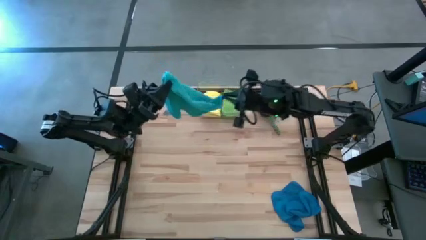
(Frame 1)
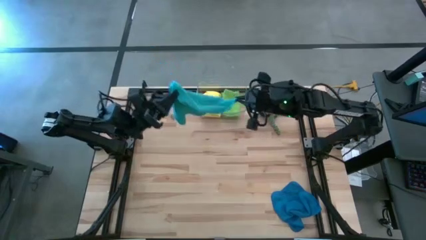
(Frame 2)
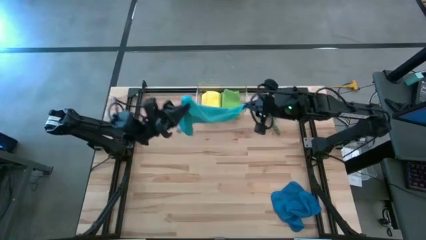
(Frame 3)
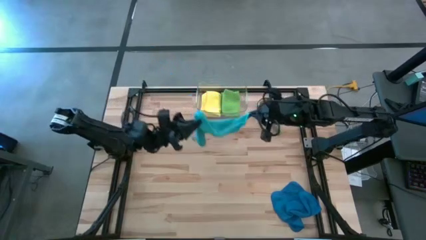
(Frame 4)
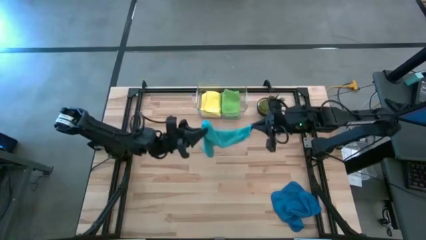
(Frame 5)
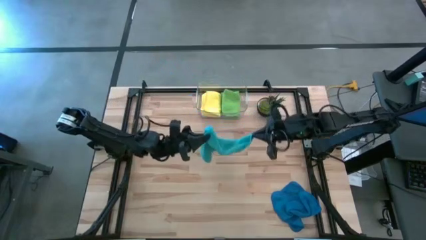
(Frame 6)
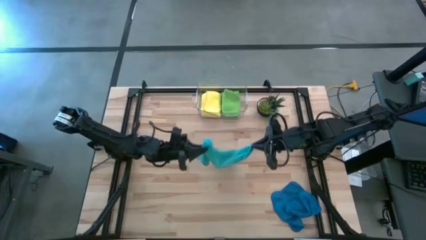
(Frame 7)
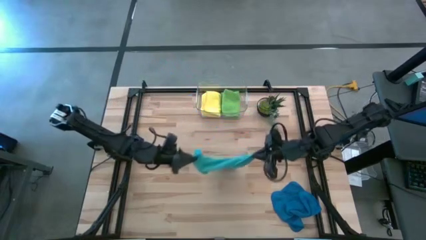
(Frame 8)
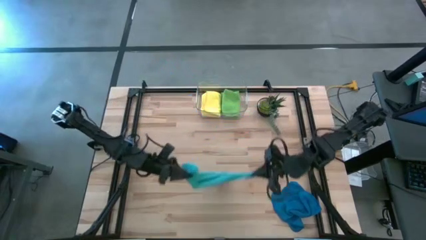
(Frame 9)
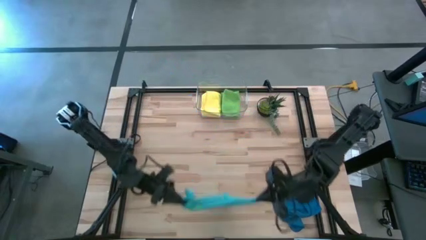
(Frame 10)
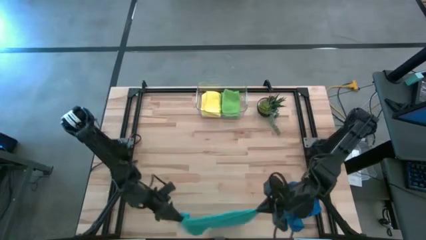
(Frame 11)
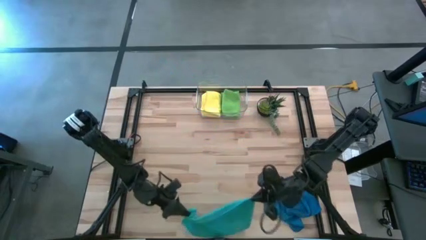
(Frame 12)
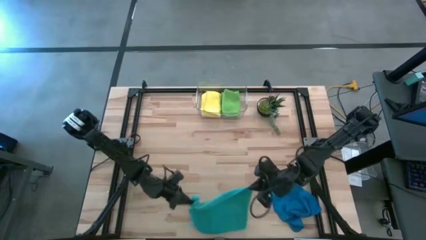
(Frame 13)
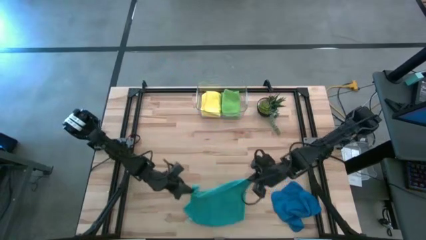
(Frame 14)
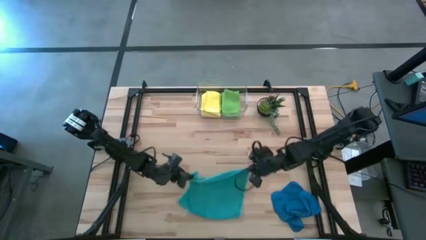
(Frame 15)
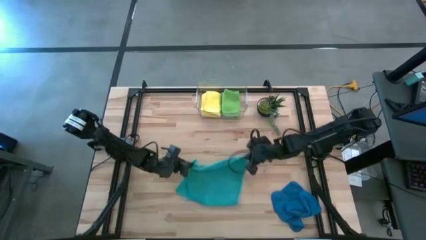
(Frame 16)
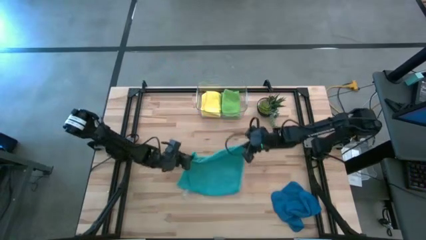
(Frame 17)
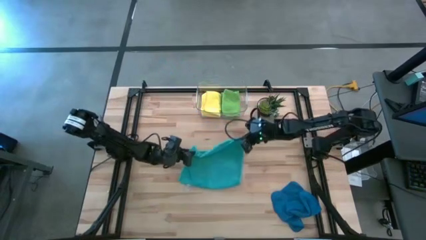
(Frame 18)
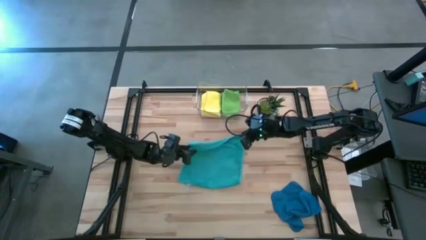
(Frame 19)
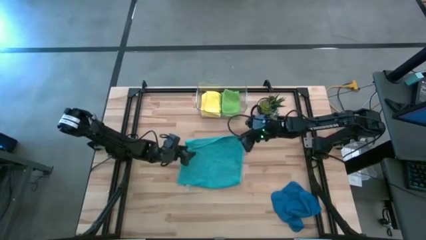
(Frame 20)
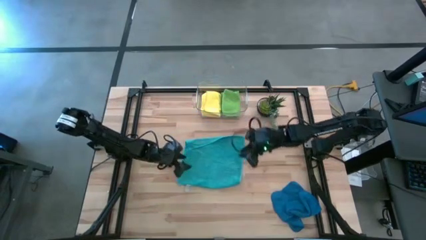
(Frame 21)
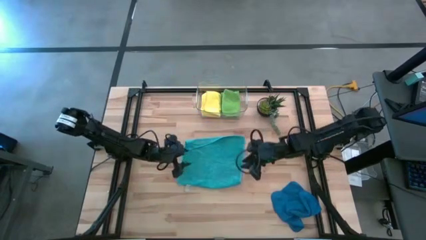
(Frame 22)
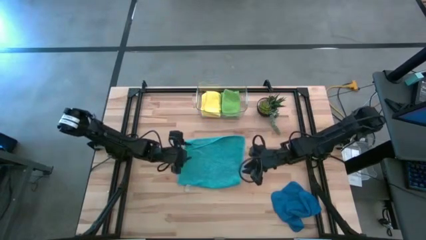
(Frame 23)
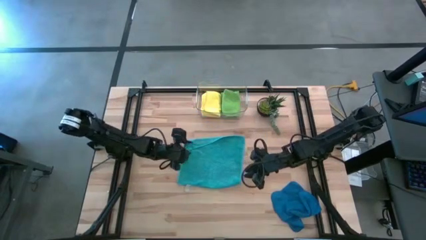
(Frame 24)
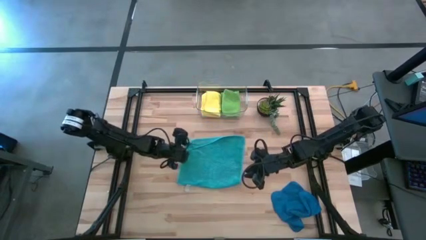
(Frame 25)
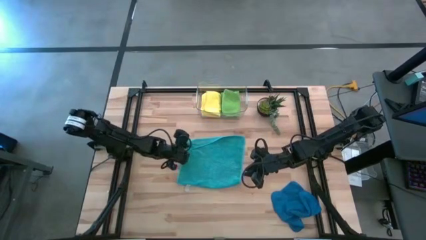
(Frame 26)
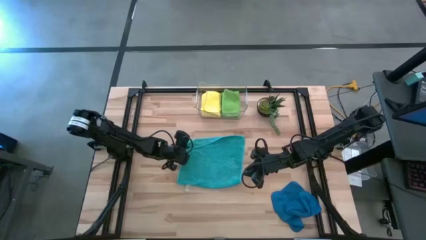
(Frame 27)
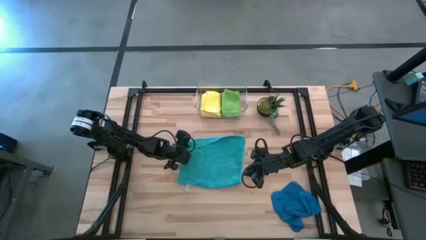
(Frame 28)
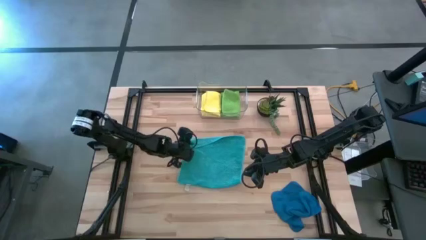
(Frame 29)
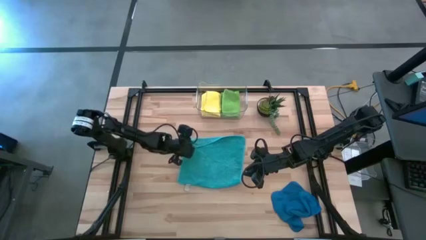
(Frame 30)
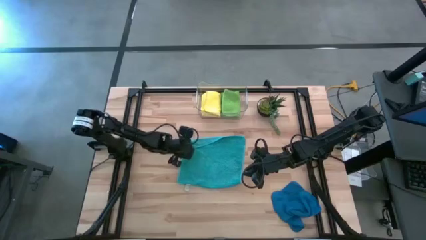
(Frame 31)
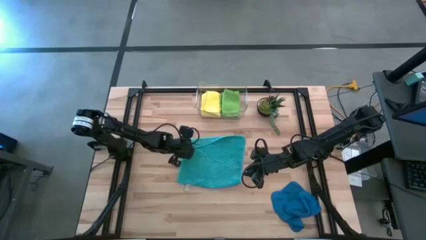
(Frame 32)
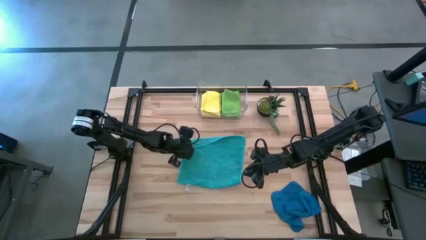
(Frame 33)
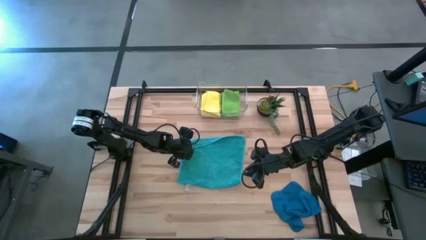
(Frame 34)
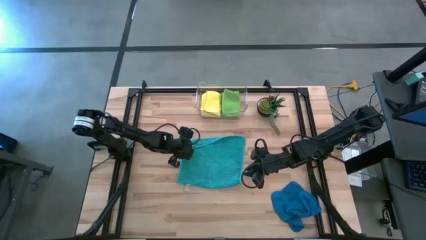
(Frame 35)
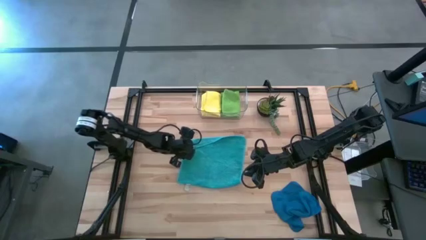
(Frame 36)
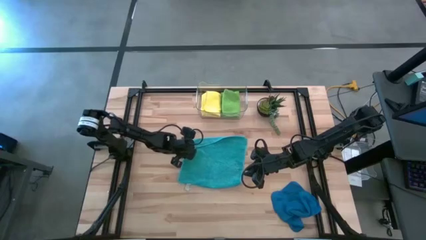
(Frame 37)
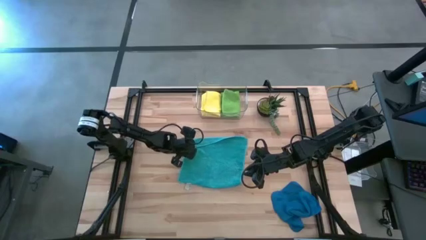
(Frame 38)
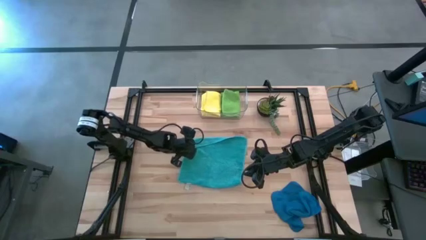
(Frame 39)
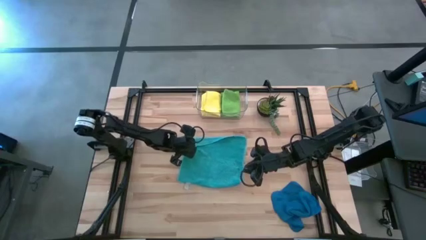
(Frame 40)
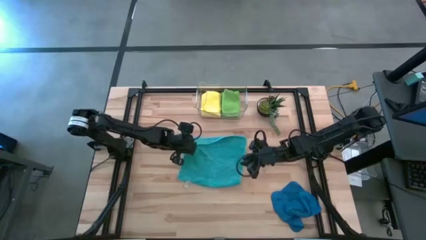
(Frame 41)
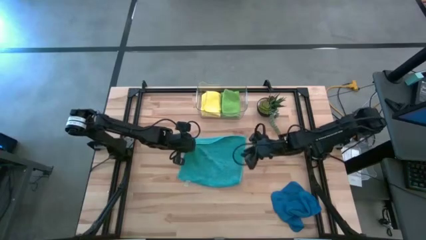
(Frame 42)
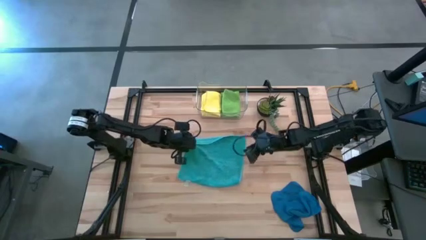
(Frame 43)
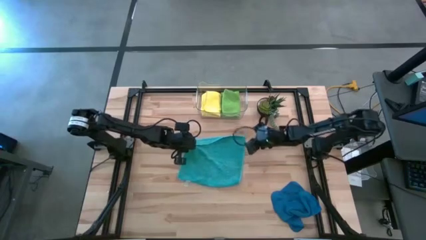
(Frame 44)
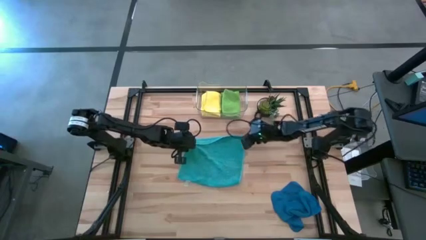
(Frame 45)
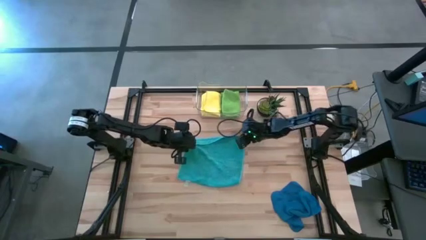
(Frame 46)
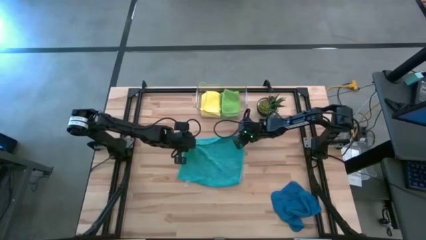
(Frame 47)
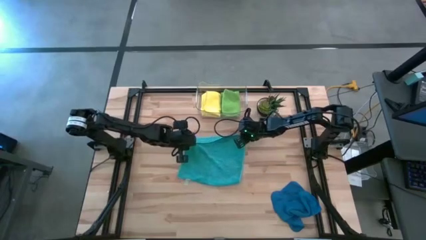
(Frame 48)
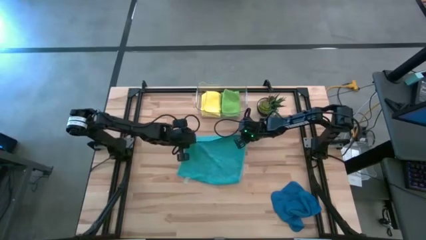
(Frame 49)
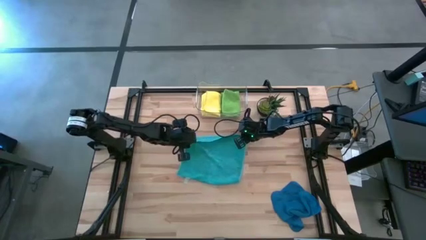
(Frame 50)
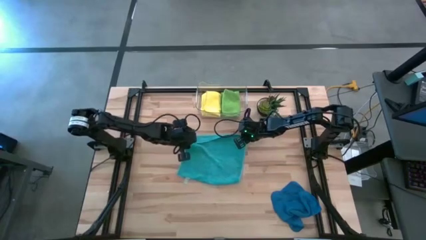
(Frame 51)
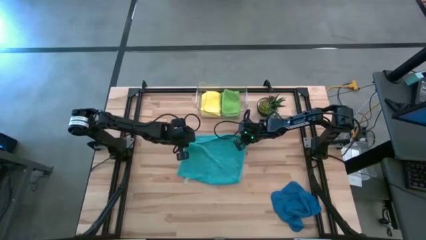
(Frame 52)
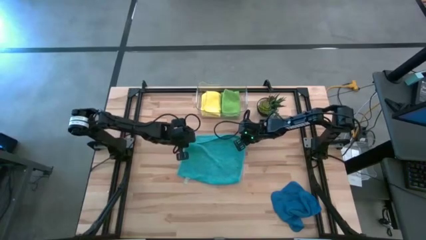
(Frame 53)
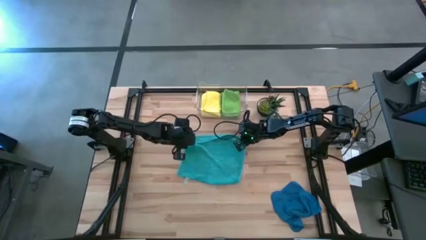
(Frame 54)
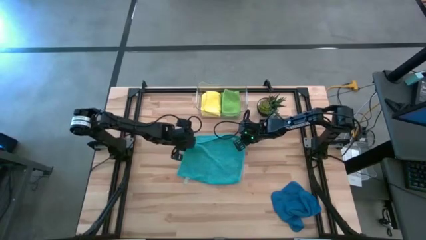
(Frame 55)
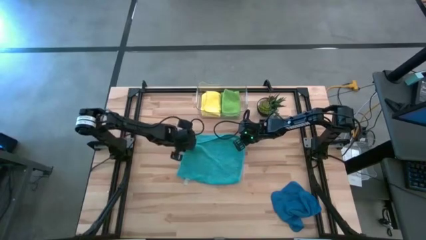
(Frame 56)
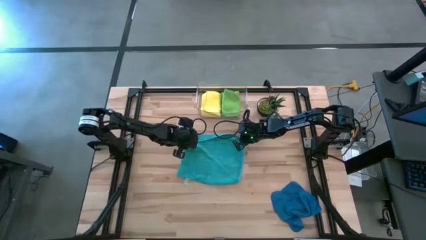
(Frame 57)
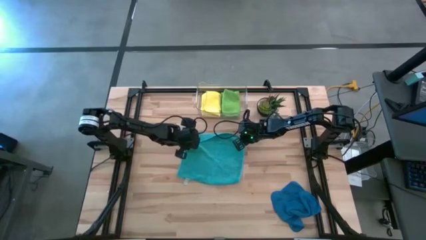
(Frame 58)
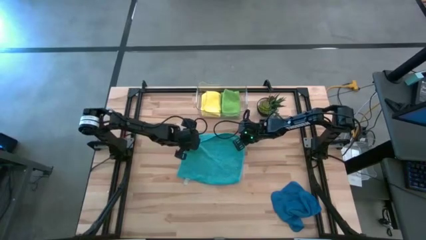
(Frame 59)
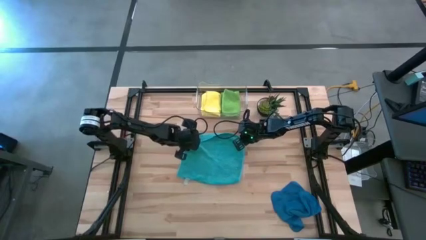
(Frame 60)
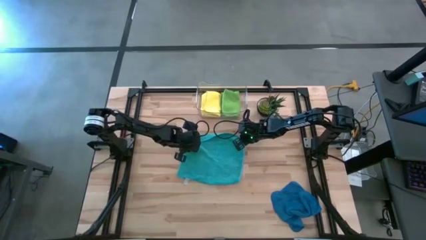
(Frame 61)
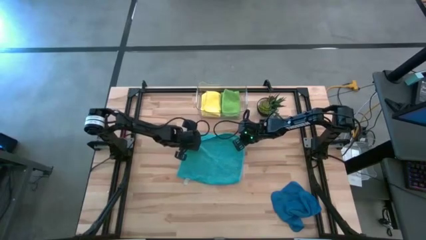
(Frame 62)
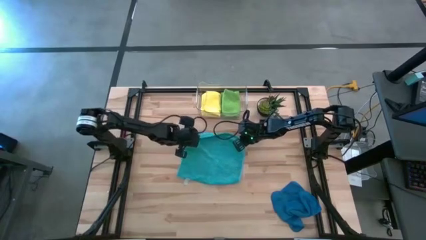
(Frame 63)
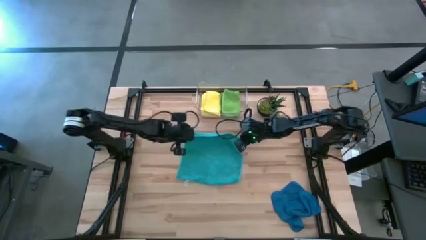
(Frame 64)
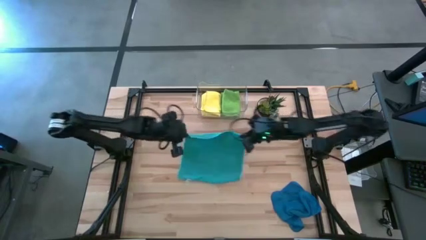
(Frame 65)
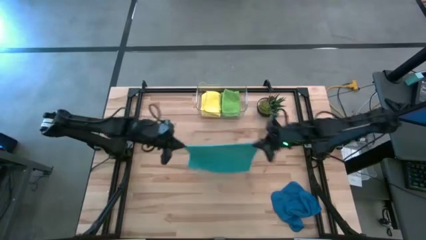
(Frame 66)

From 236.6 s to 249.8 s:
Task: Fold microfiber towels
Fold the light blue microfiber towel

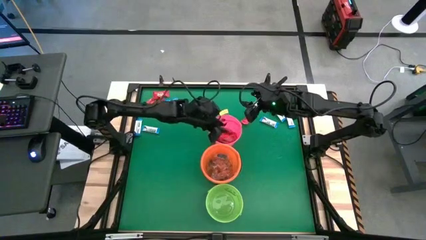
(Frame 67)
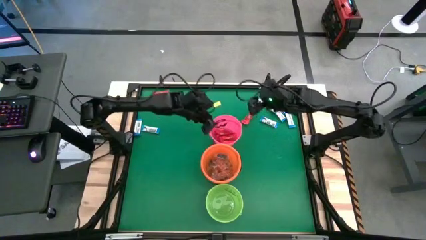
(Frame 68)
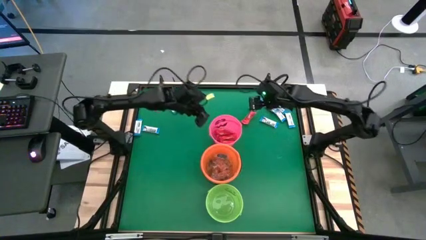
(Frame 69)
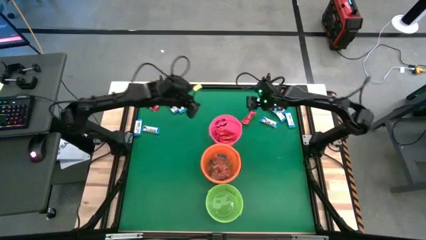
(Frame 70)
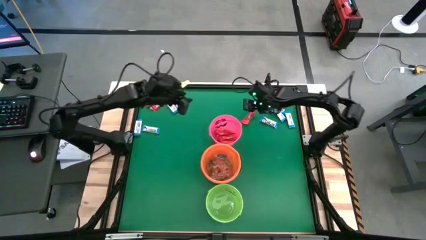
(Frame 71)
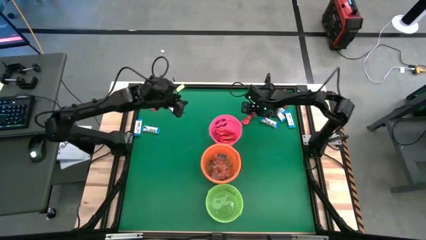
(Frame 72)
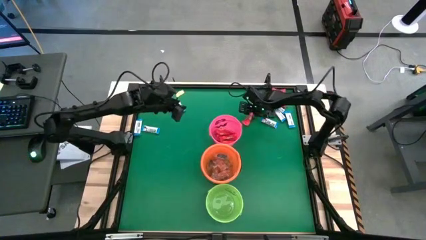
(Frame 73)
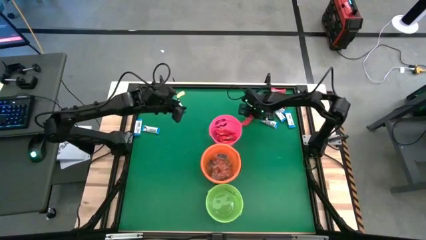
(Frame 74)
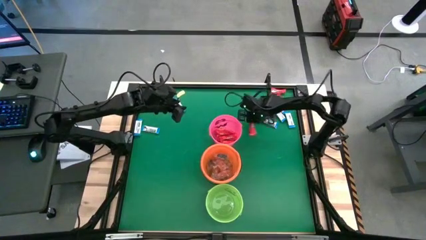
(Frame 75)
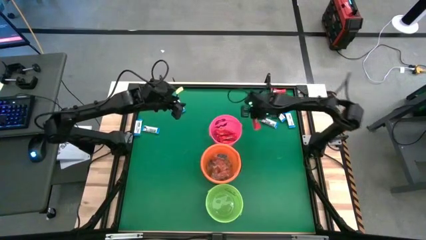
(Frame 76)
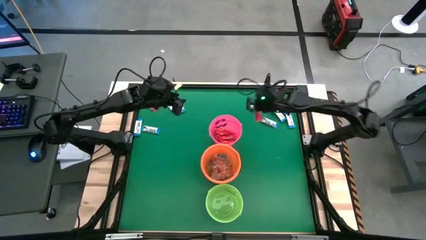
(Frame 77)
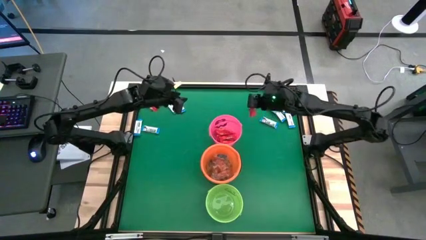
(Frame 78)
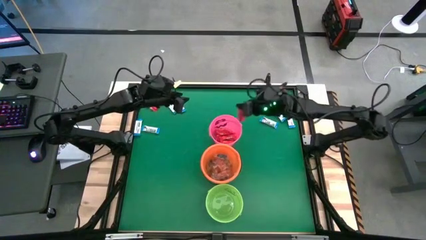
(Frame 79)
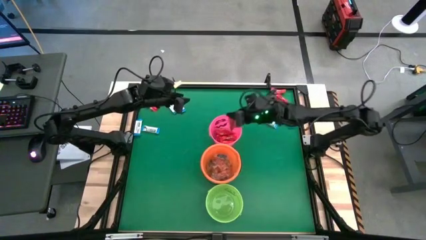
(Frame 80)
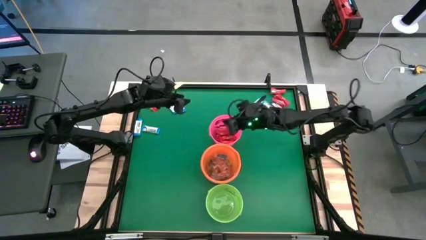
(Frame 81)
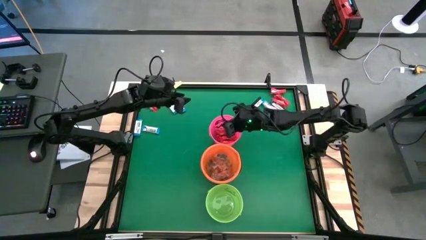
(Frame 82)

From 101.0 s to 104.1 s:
Task: Sort candy by brand, put in halloween buckets
Put the red chocolate into the pink bucket
